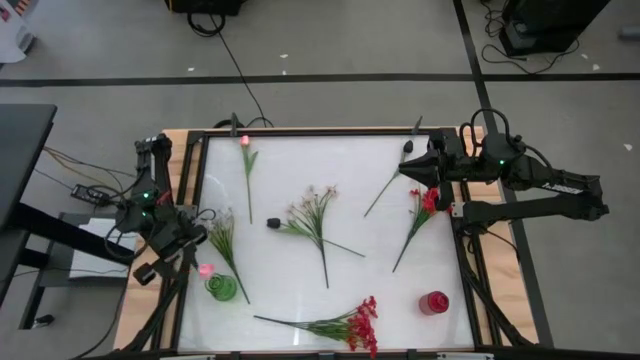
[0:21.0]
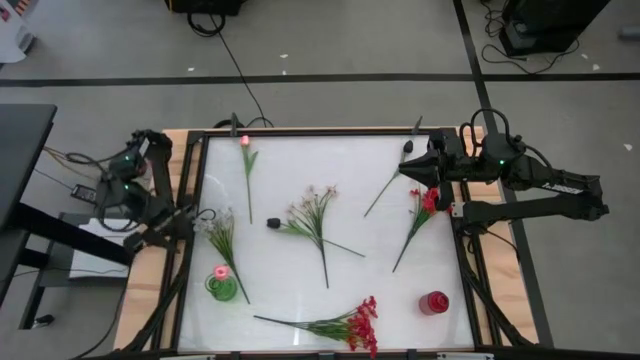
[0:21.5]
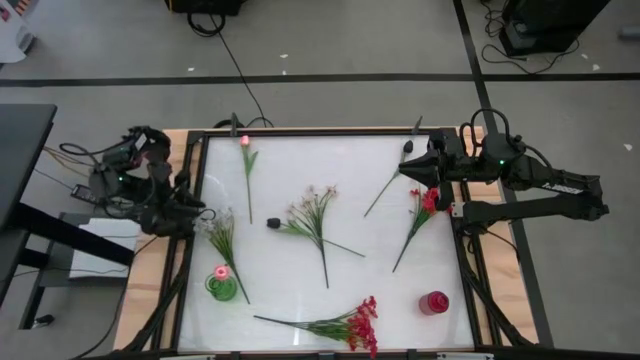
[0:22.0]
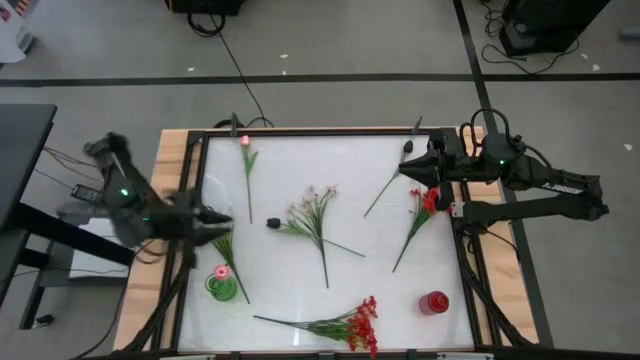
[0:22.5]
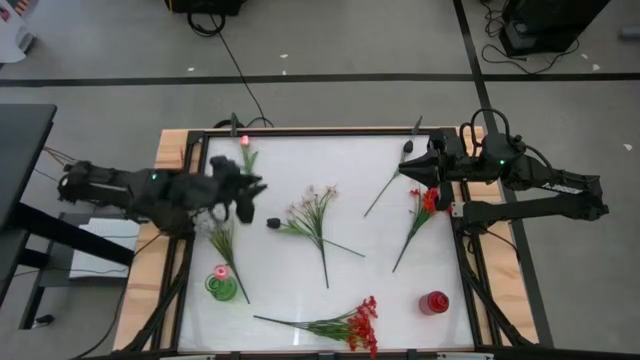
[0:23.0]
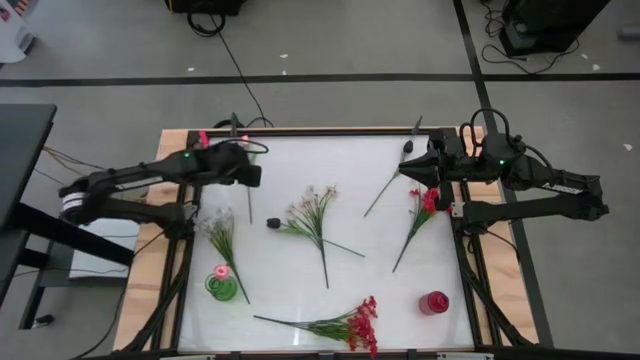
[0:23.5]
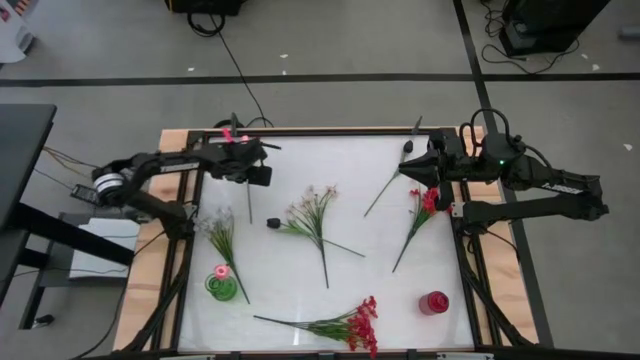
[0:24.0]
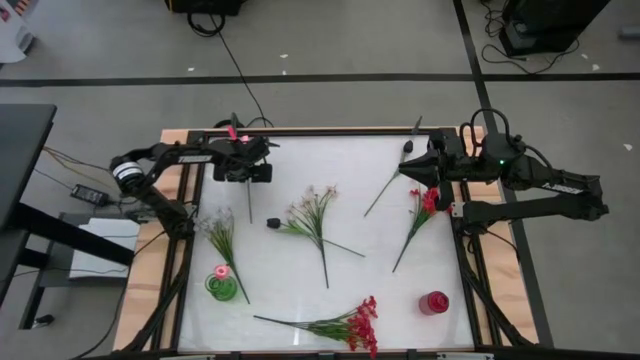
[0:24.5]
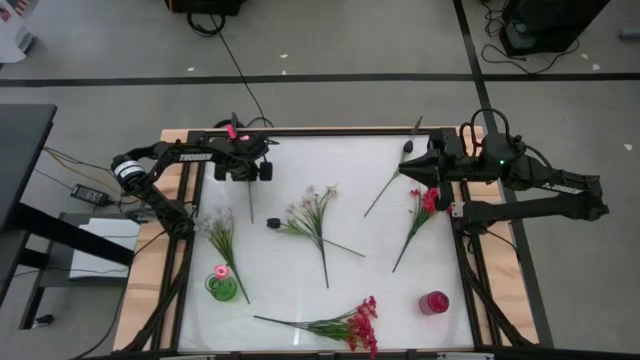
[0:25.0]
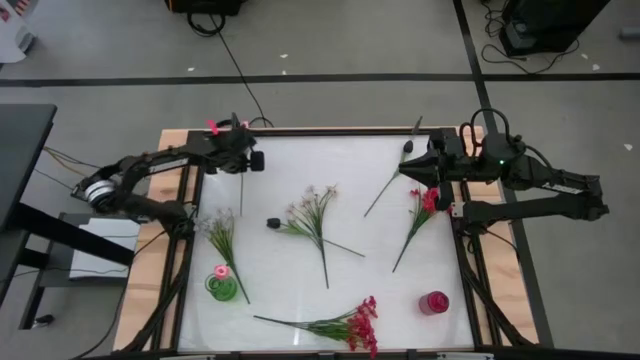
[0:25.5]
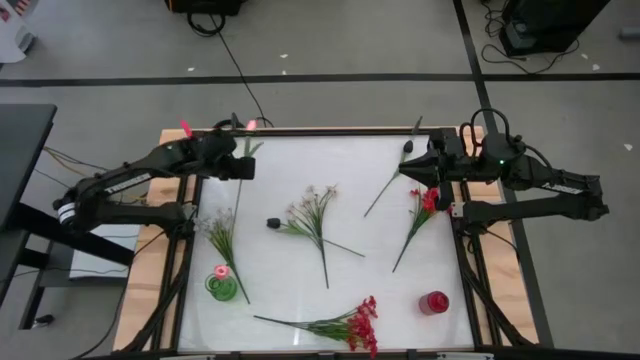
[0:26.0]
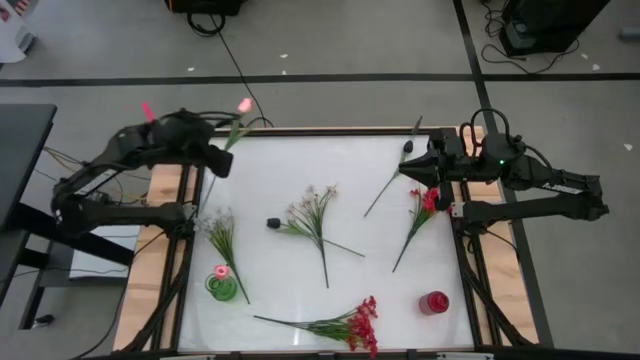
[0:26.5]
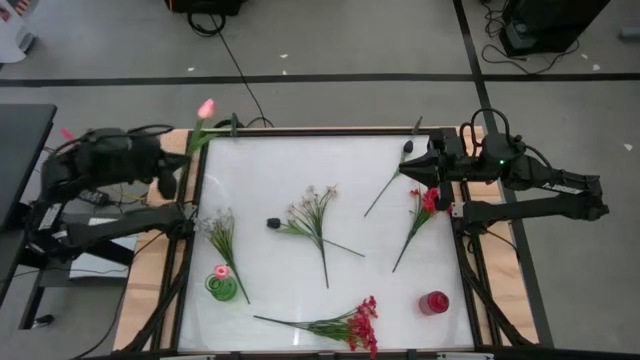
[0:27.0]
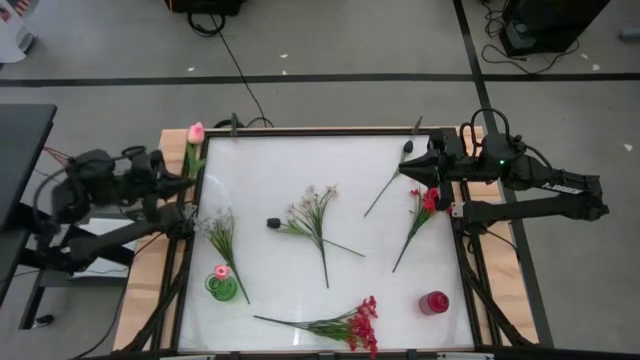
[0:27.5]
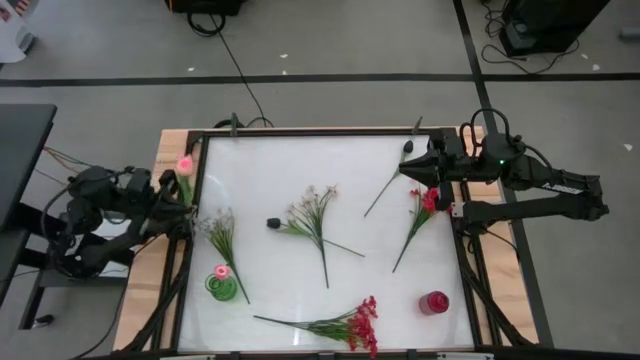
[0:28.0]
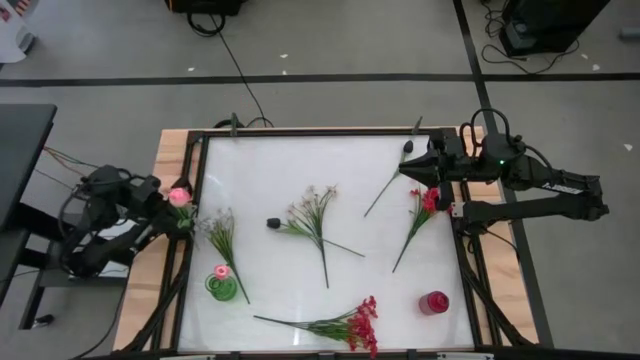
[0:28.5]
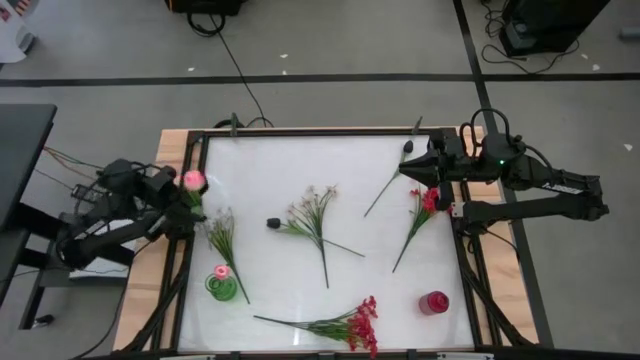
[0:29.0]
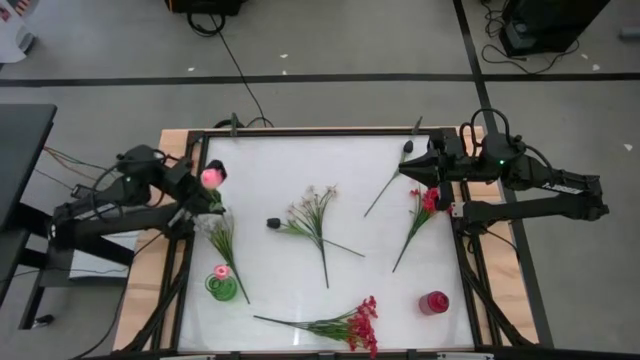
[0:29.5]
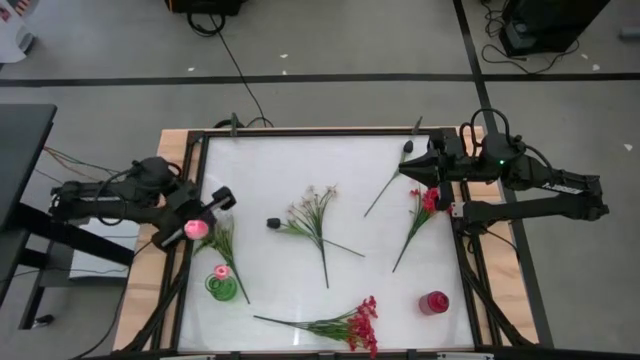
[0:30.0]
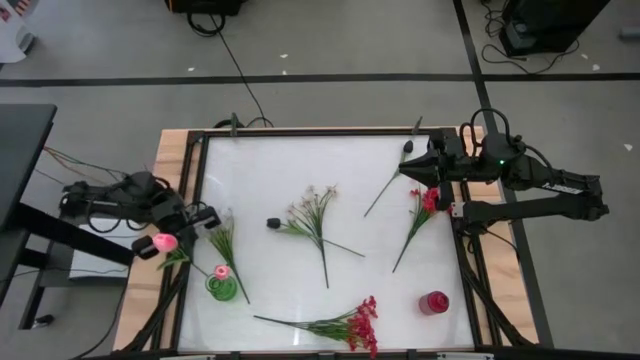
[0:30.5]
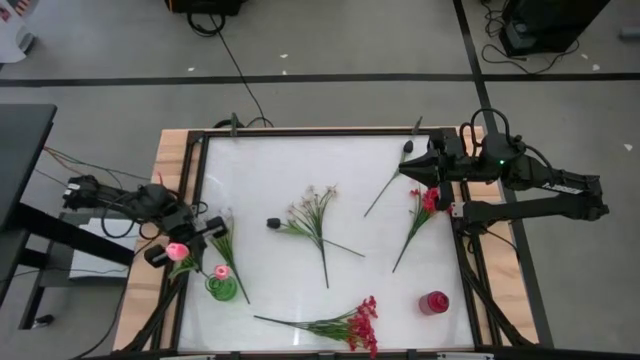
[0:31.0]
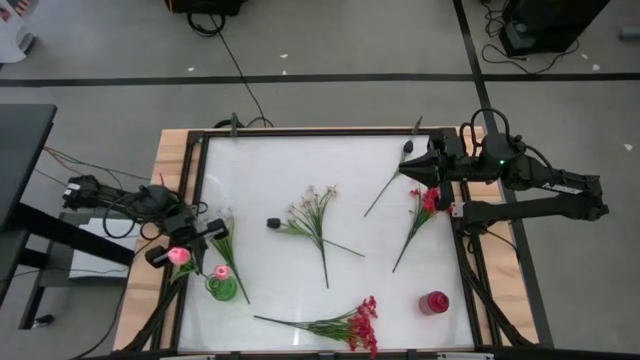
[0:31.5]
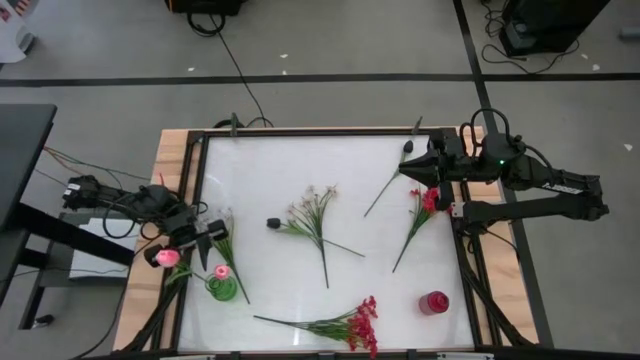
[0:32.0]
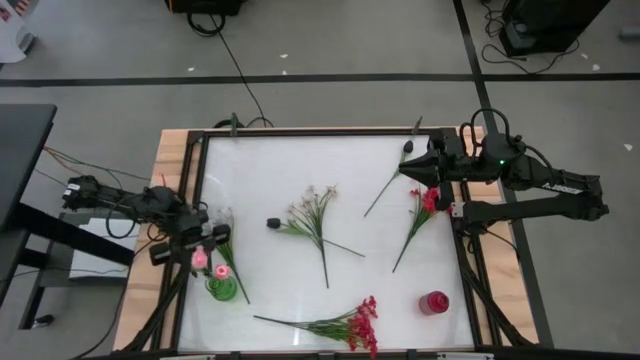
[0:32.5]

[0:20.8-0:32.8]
Task: Sort flowers into vase by color
Put the pink flower into the green vase

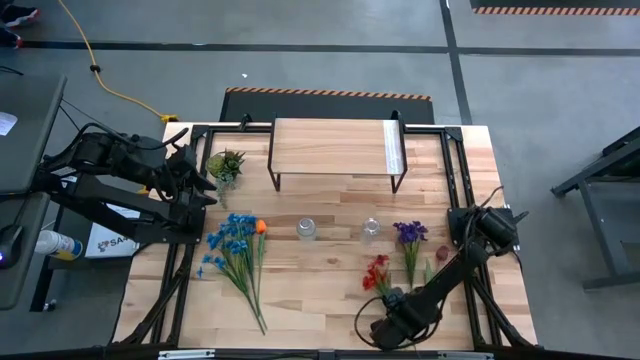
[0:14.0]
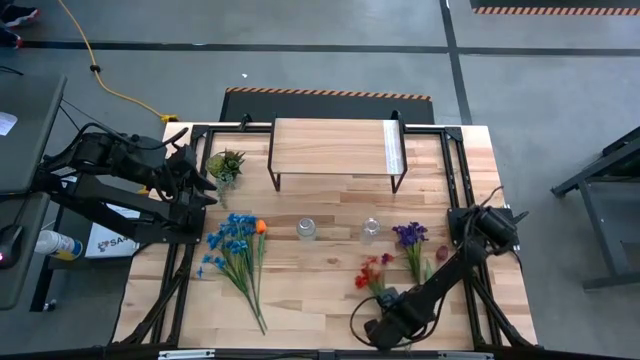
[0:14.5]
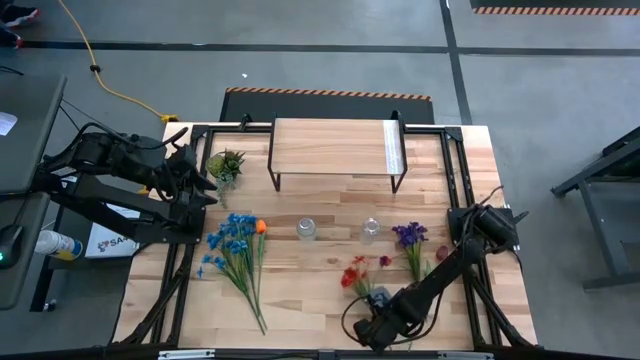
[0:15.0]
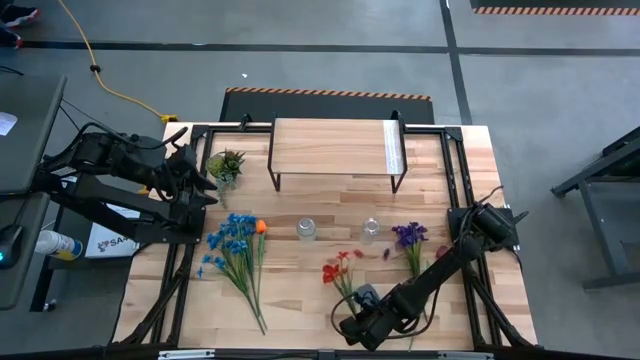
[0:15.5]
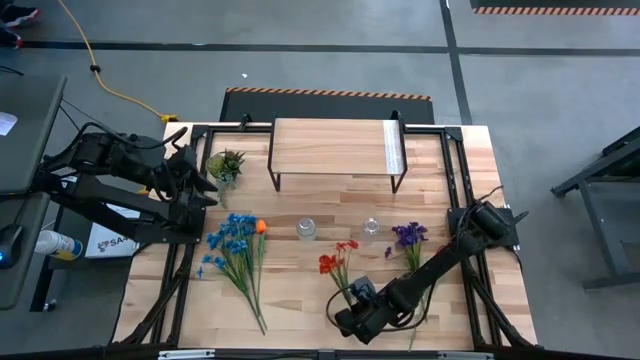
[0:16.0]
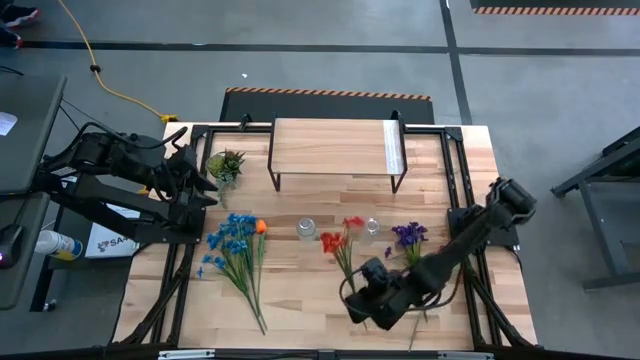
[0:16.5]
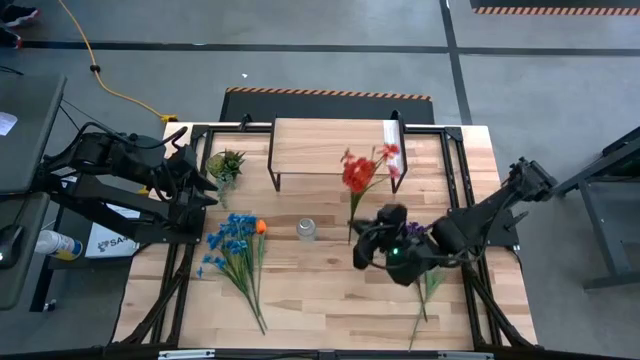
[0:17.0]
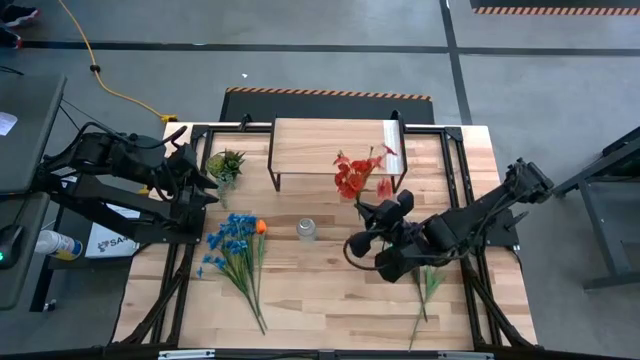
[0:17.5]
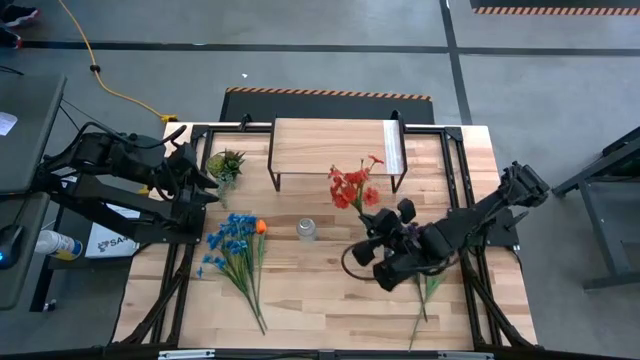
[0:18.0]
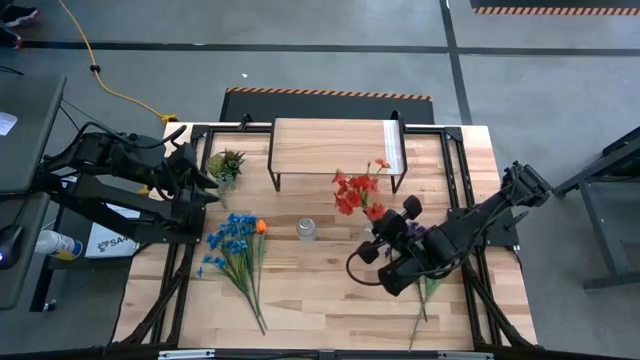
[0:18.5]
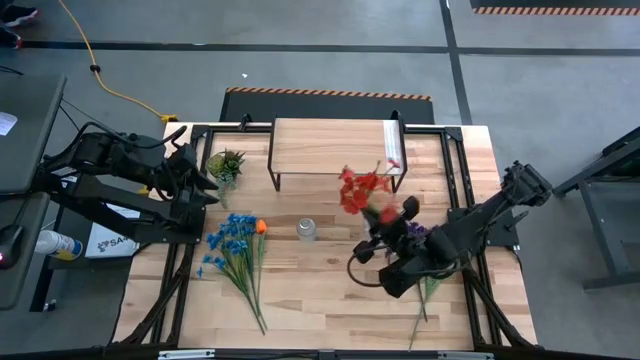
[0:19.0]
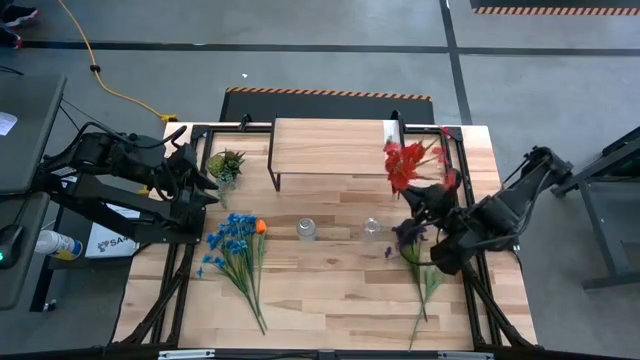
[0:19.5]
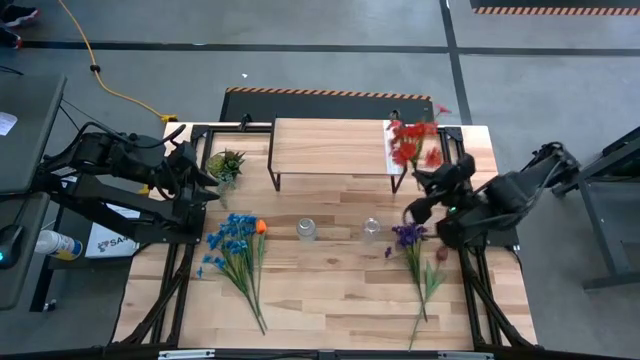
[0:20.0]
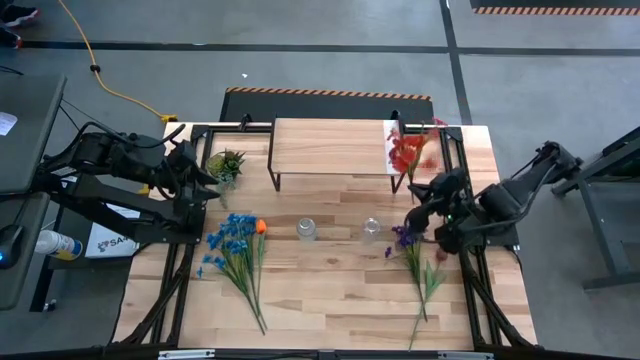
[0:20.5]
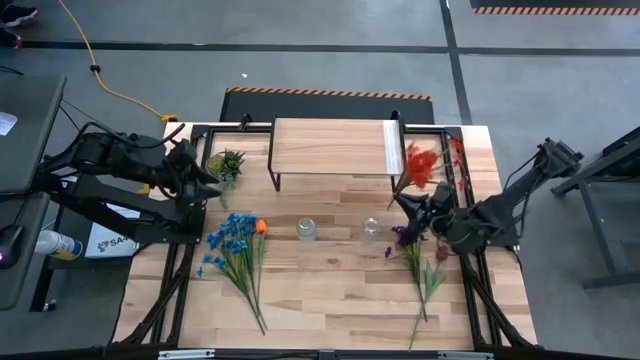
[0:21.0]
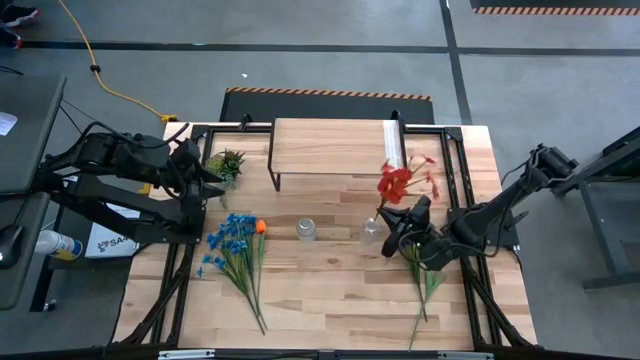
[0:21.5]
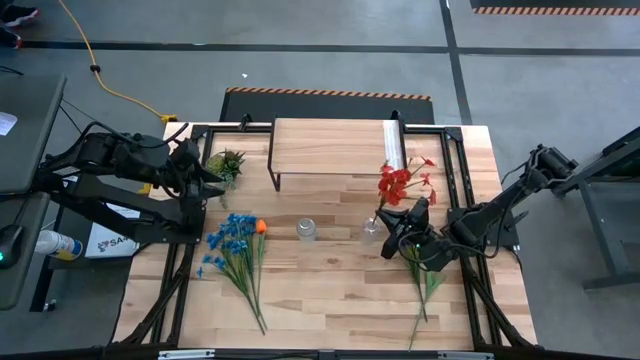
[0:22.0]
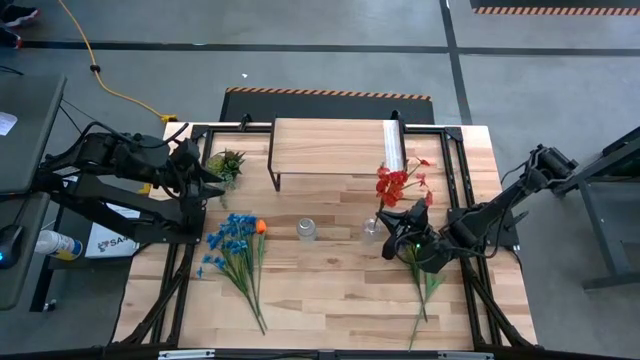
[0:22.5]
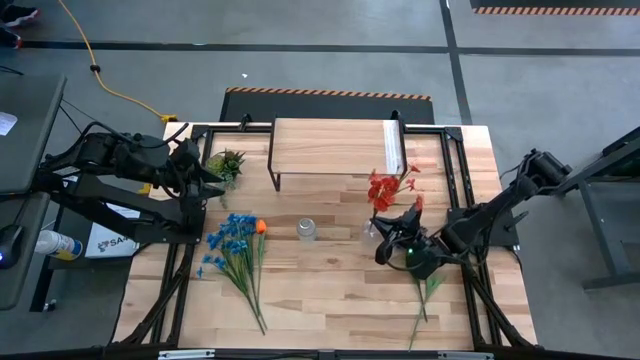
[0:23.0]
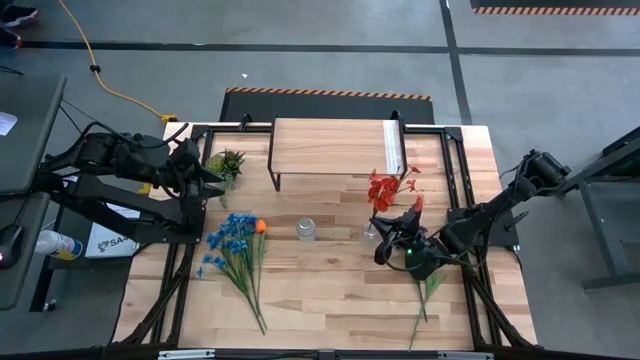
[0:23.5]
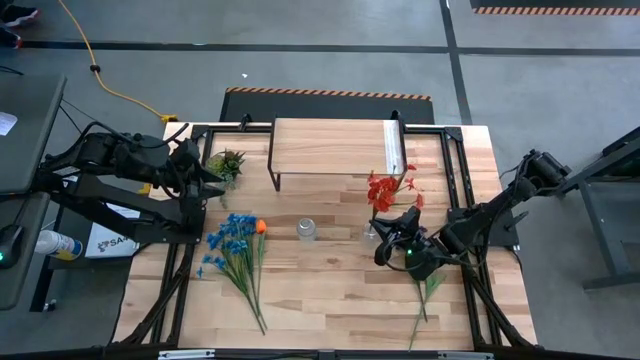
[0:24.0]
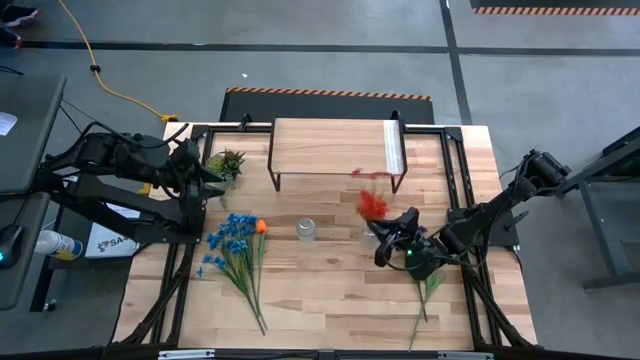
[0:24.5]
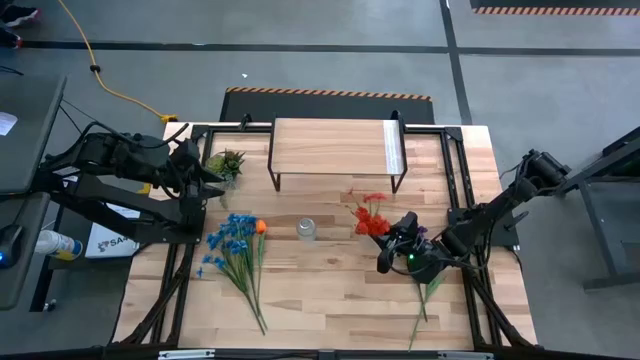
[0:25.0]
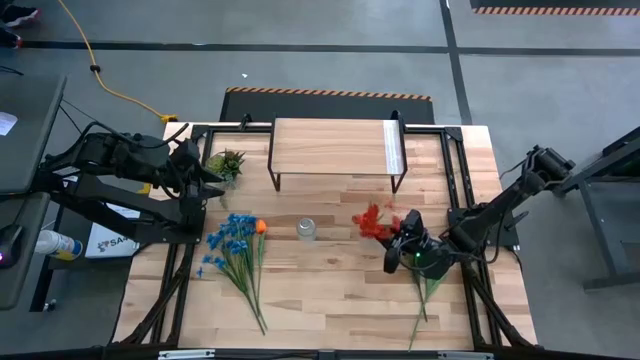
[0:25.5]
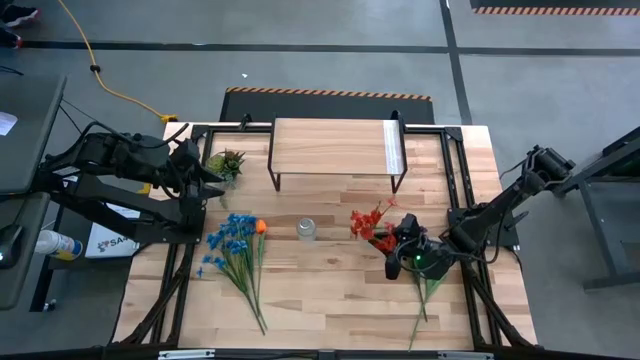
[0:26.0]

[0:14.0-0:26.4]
Task: Pick and place flowers into a vace then onto a shelf
Put the orange flowers into the right transparent flower vase
